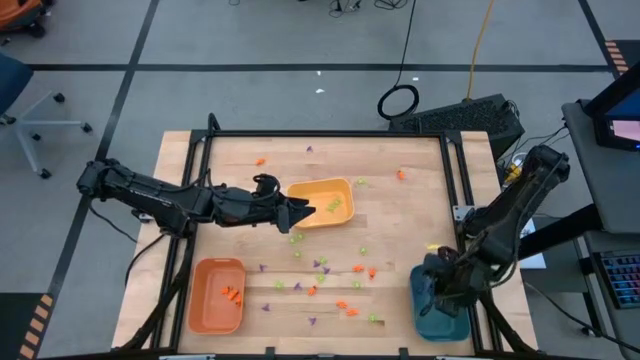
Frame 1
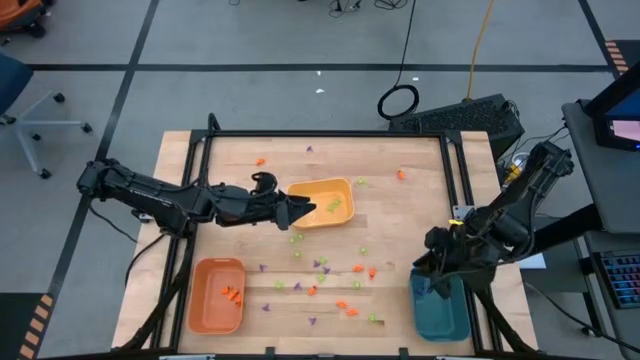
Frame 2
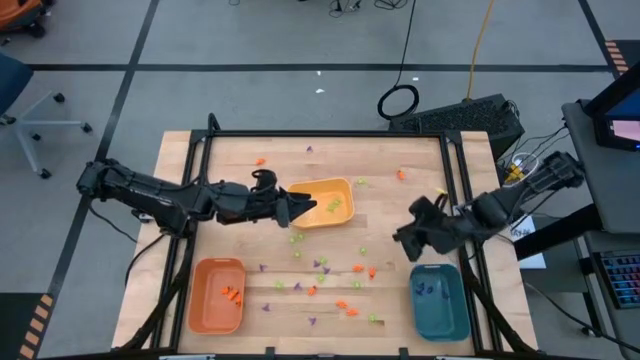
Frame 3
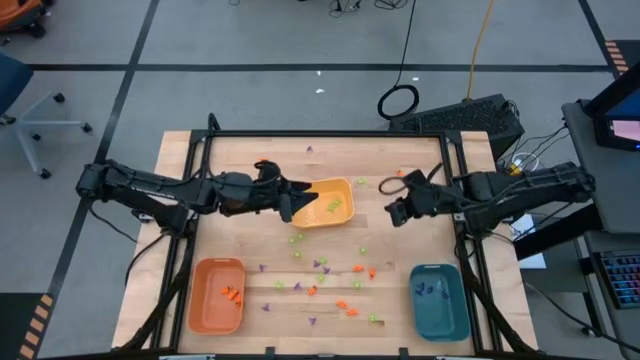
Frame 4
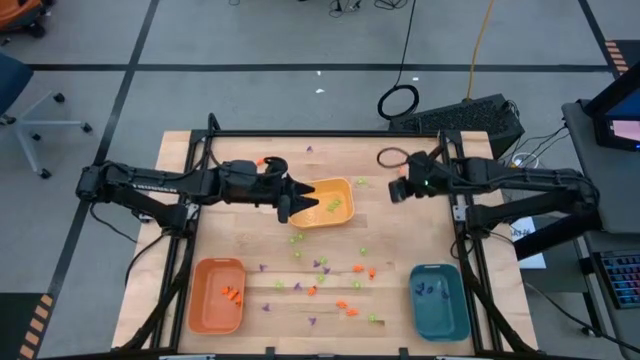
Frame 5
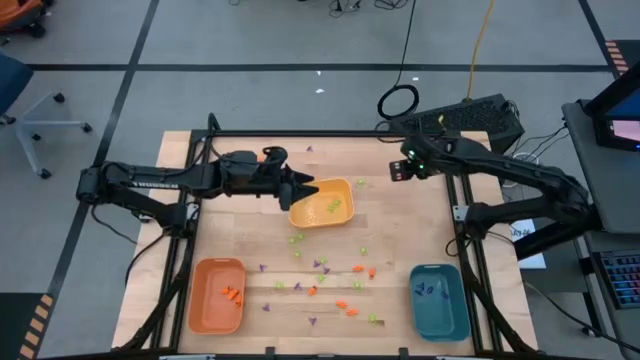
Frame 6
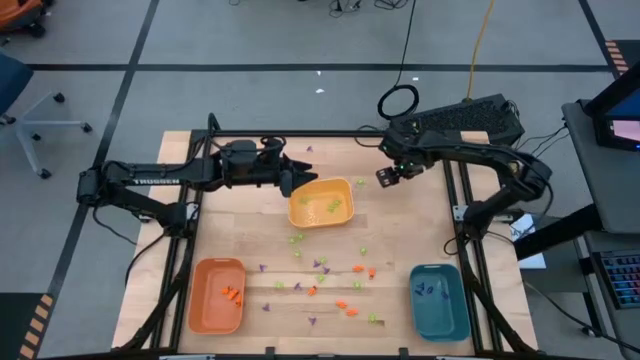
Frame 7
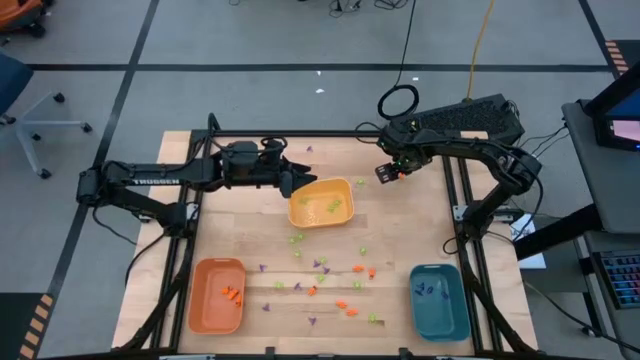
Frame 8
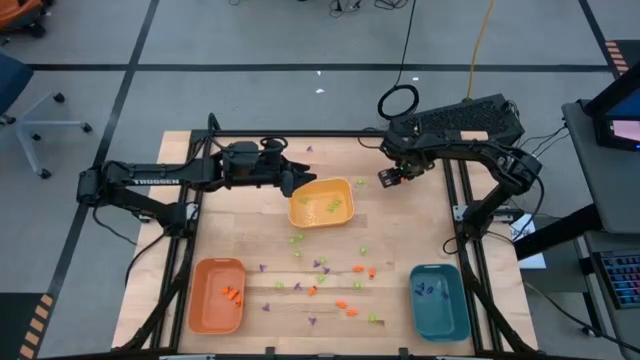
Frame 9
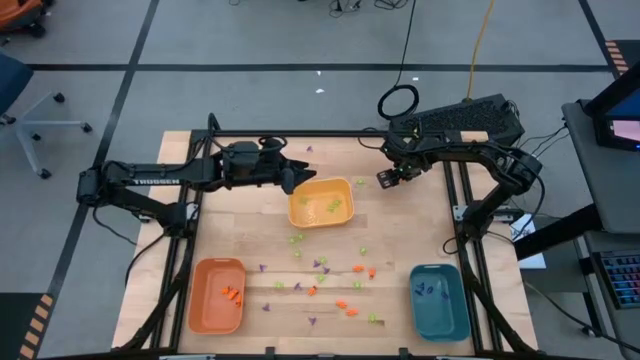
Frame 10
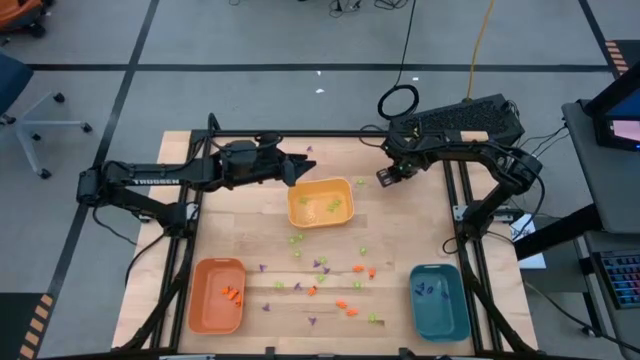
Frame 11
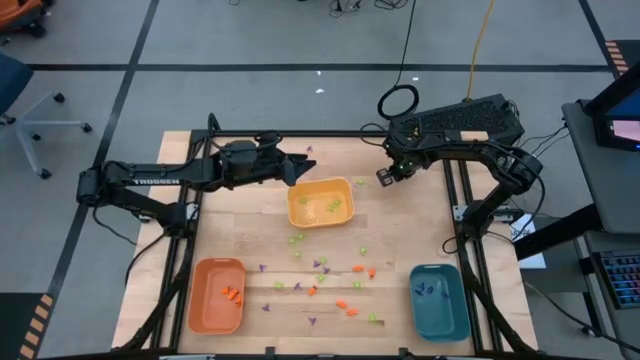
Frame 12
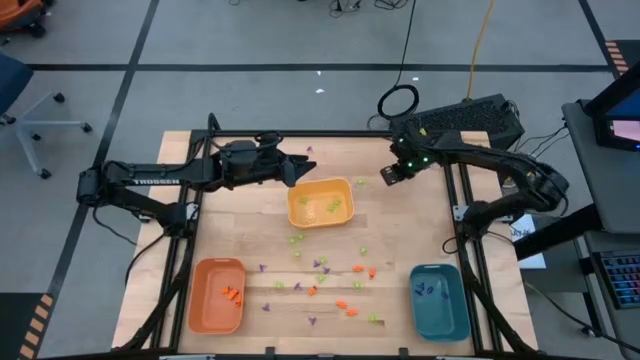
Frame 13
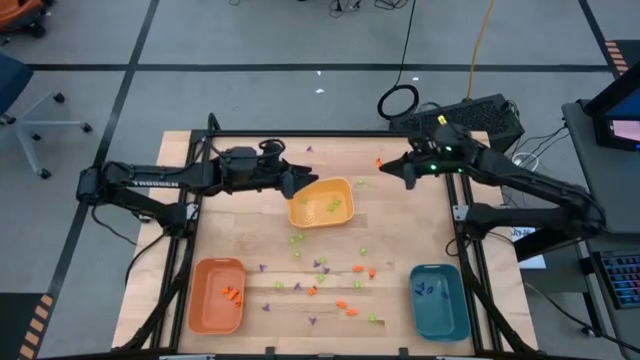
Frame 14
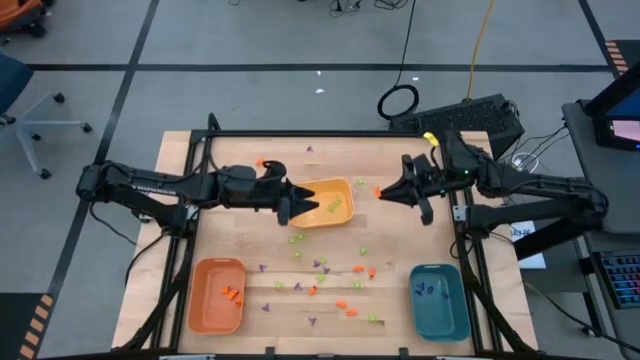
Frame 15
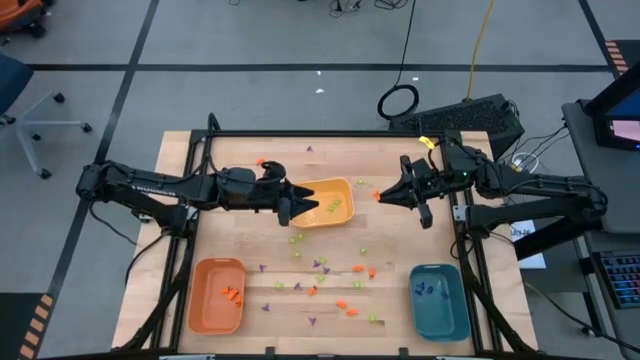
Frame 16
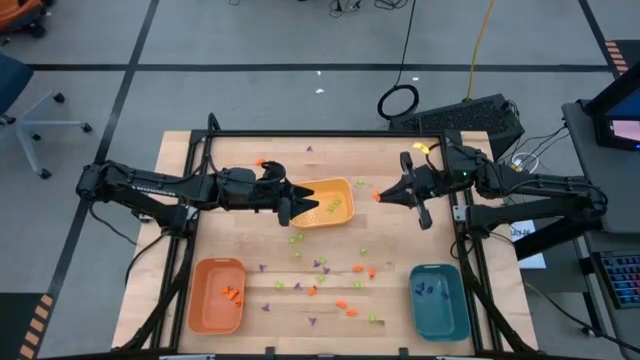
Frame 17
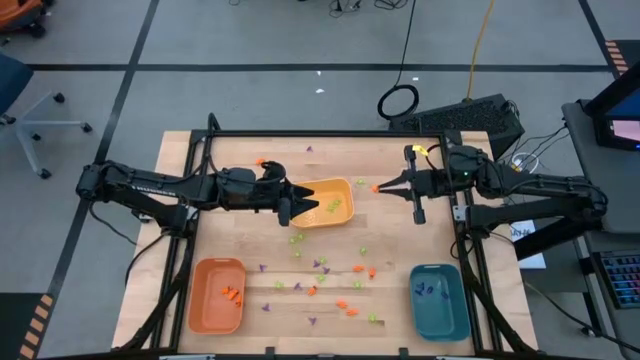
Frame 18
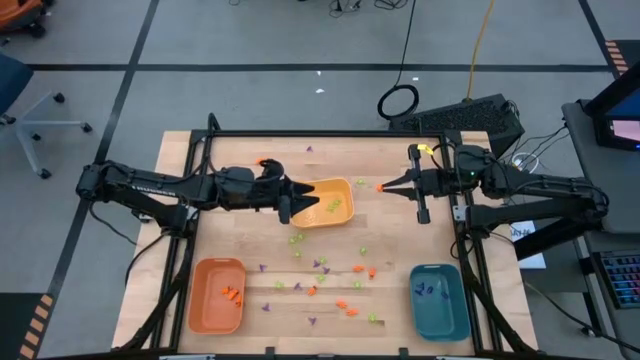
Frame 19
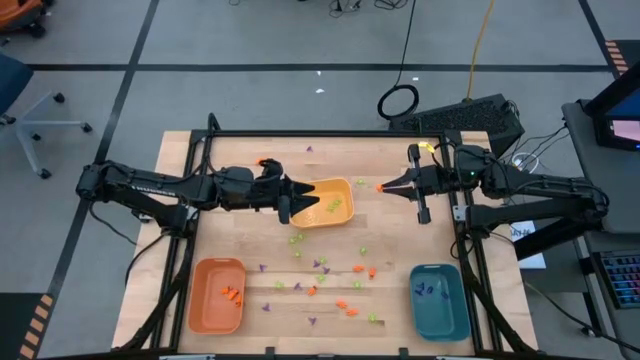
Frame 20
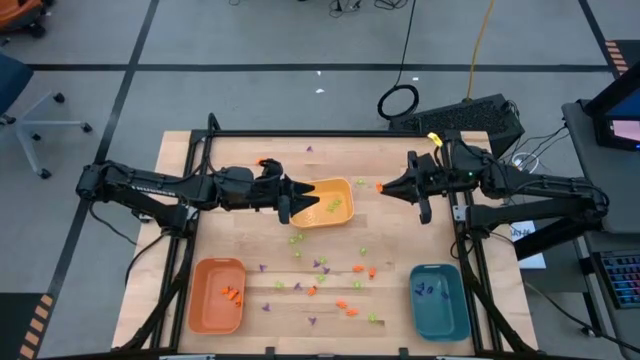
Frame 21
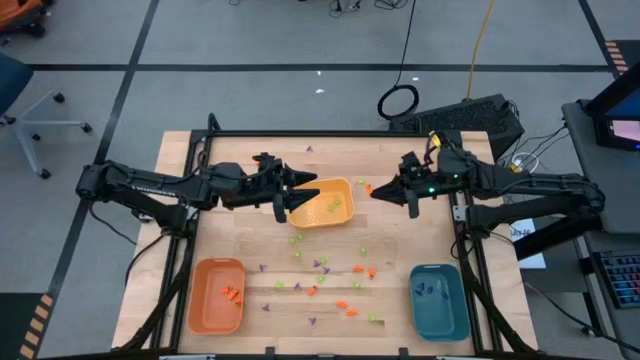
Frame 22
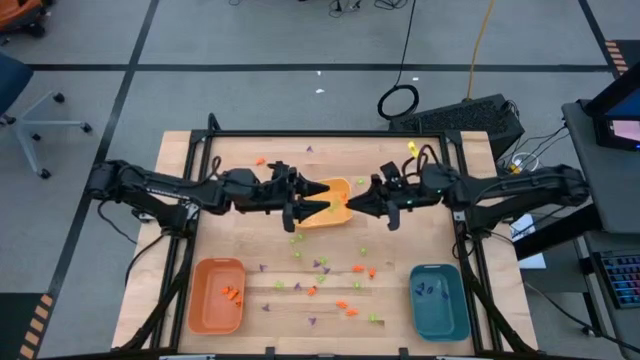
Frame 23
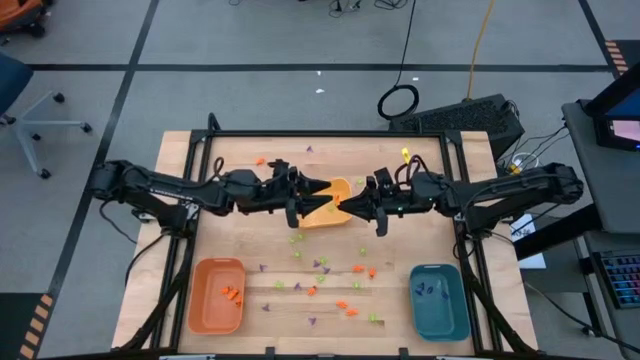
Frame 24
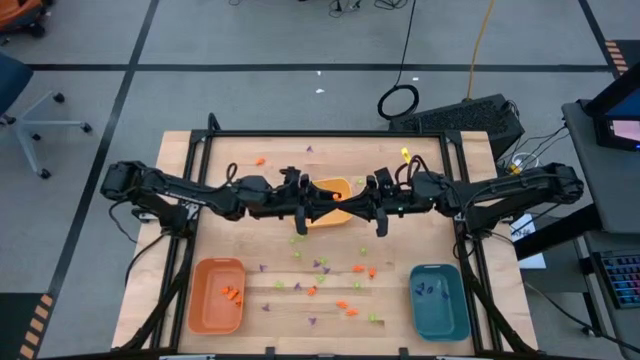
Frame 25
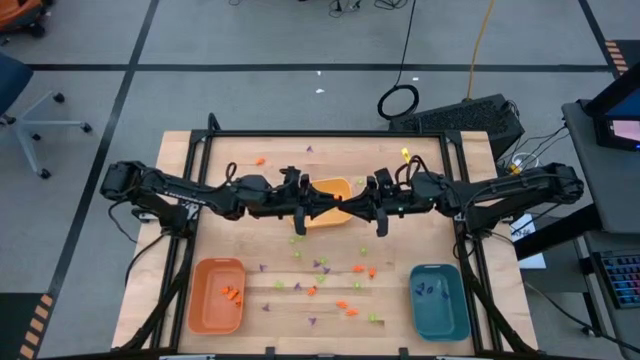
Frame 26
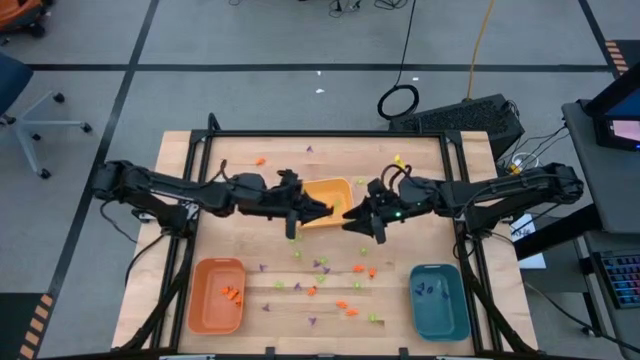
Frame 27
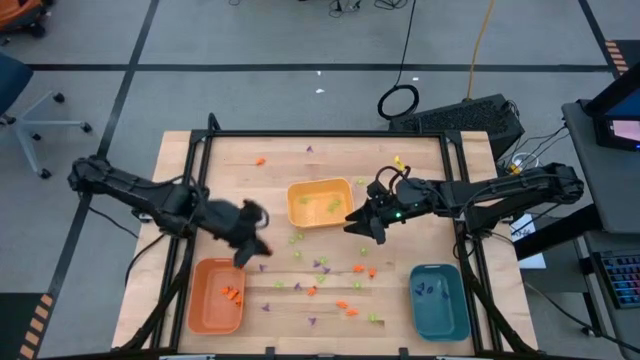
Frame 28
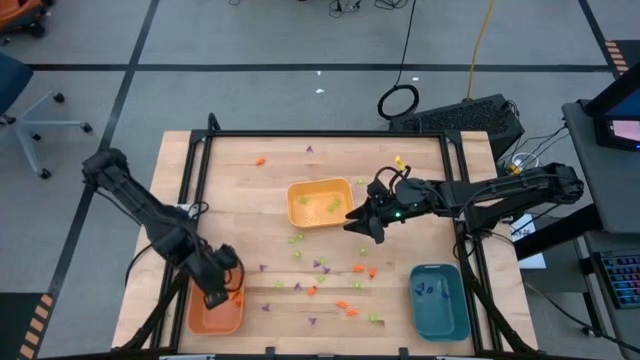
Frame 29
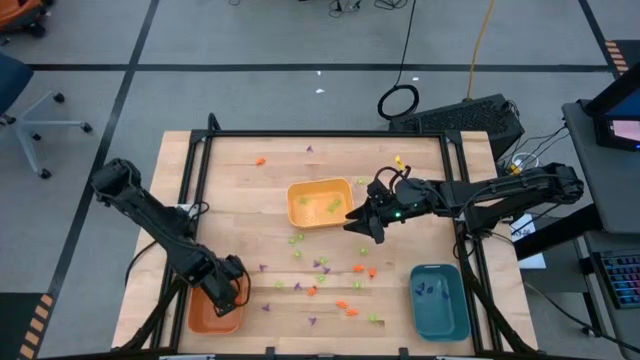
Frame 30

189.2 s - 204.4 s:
Task: Sort Halloween decoration
Put the orange skeleton toy into the orange bin

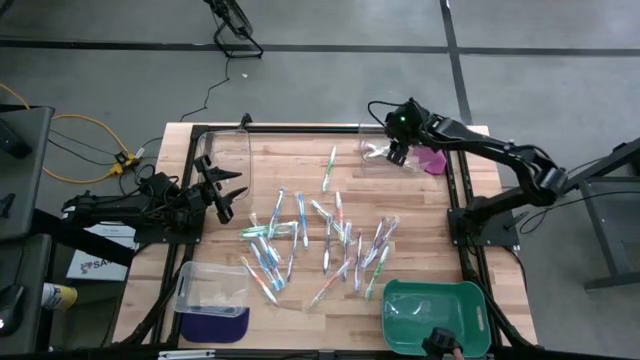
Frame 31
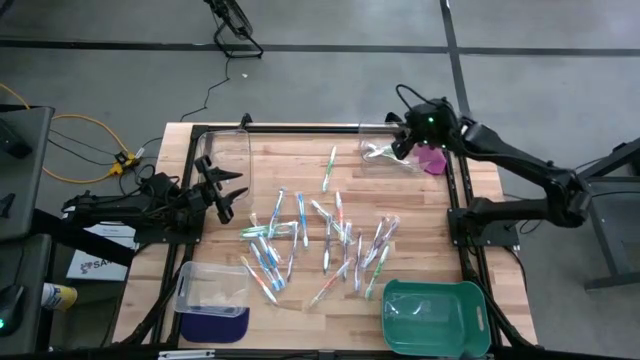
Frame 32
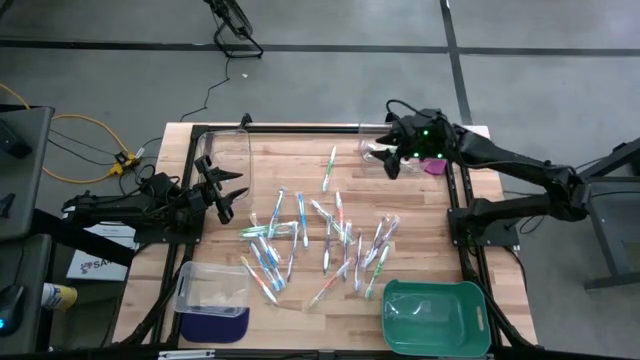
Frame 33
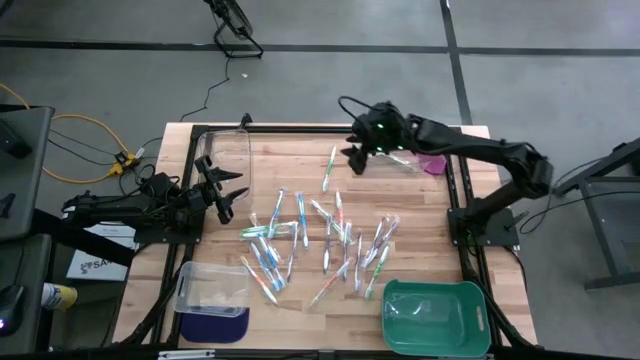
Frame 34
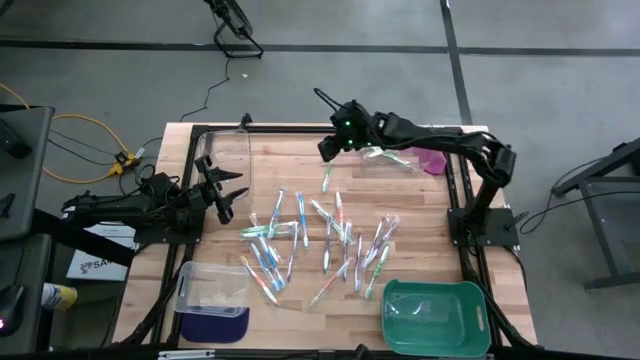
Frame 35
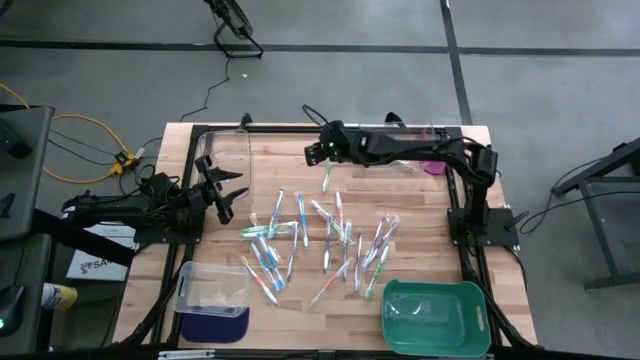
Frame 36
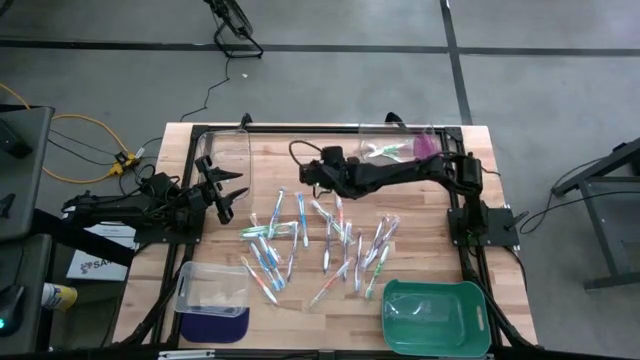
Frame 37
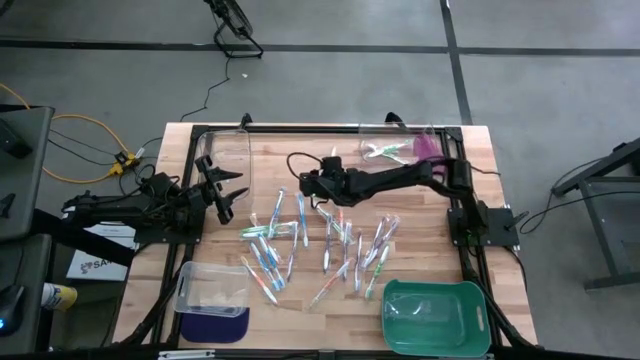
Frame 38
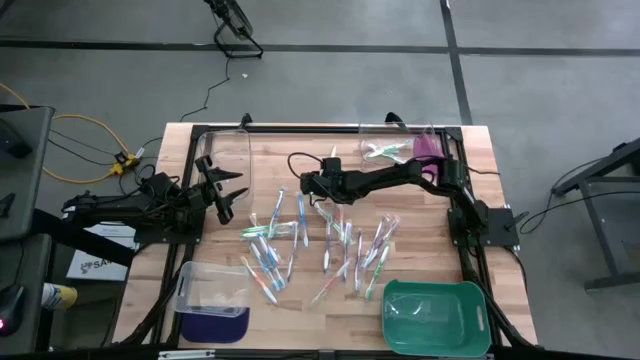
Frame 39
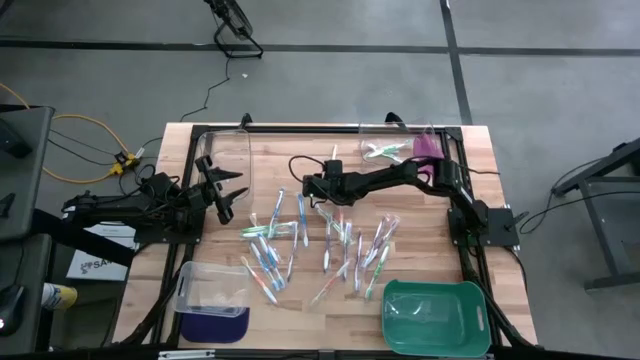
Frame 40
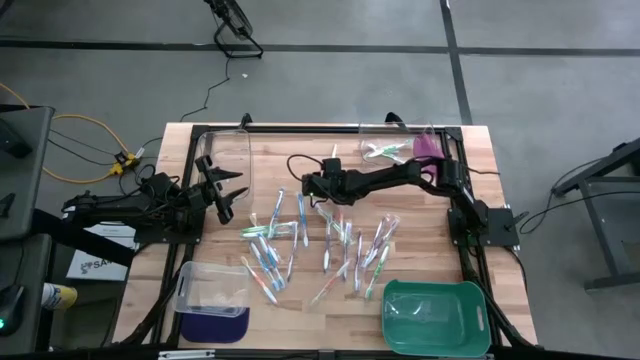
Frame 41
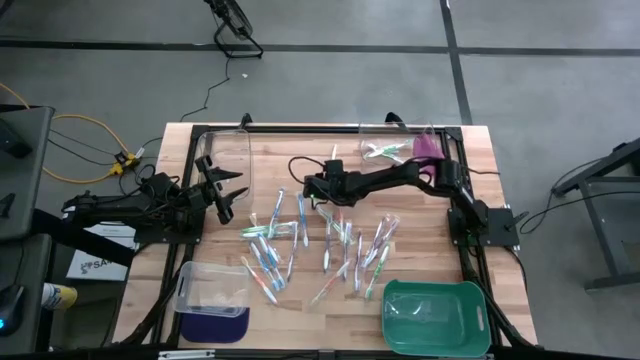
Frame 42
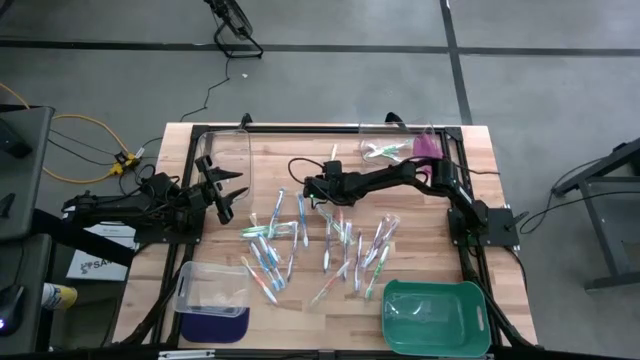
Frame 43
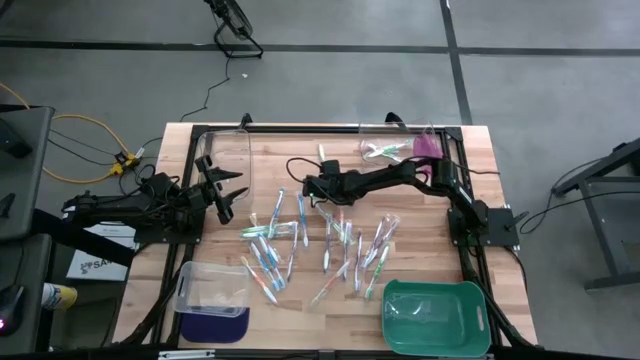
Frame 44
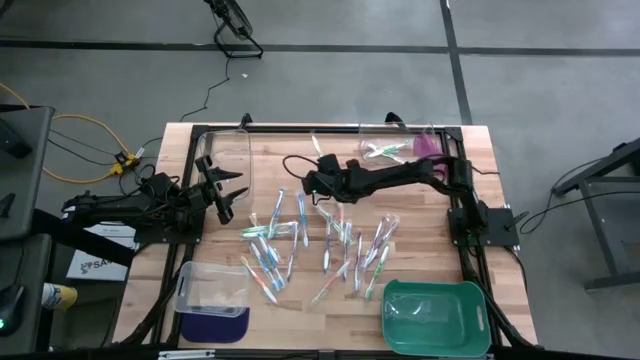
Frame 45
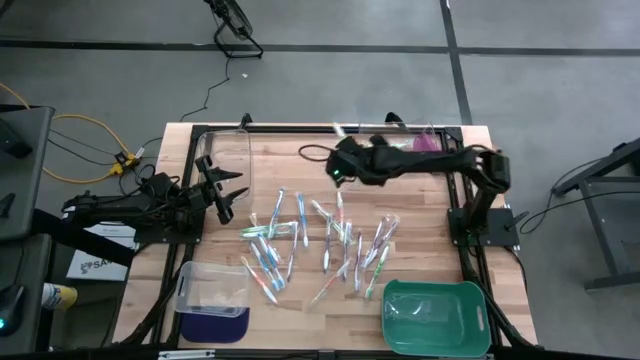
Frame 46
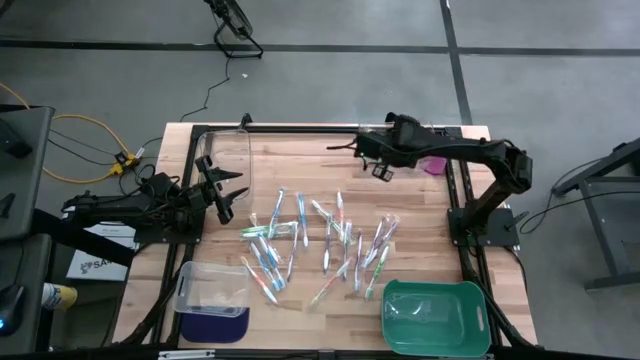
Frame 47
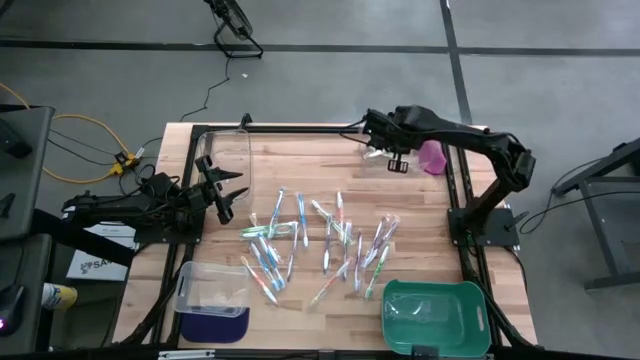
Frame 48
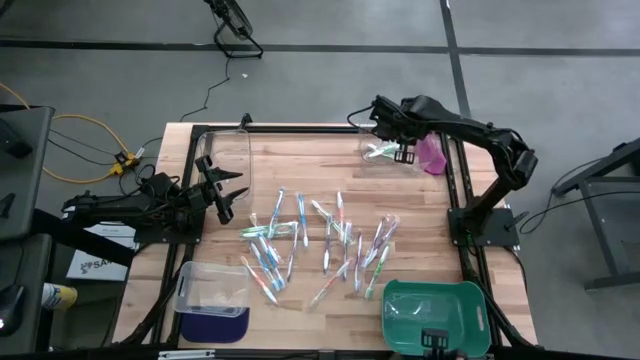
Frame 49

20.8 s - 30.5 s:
Task: Pick & Place Toothbrushes
Put the green toothbrush into the top right transparent bin
